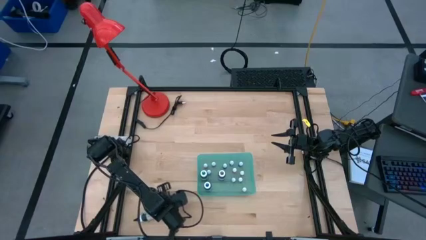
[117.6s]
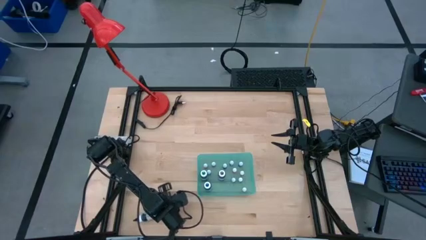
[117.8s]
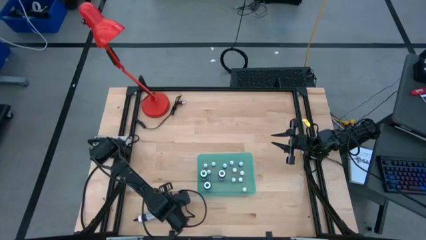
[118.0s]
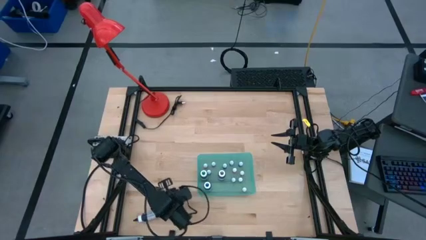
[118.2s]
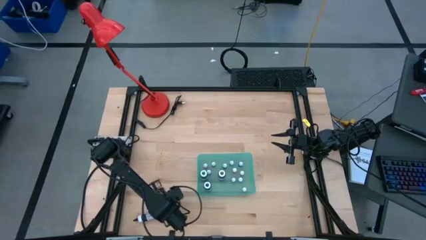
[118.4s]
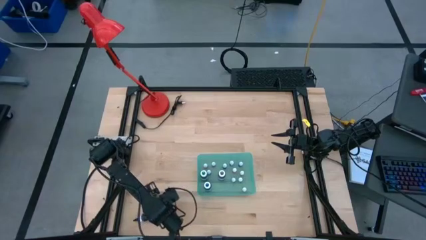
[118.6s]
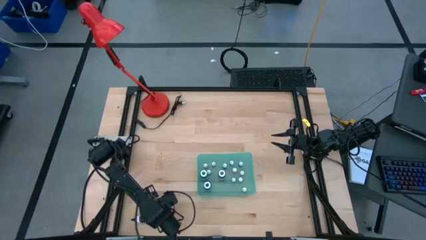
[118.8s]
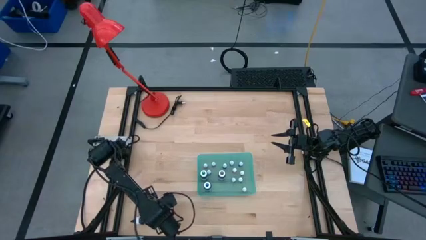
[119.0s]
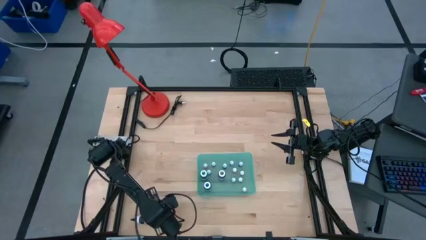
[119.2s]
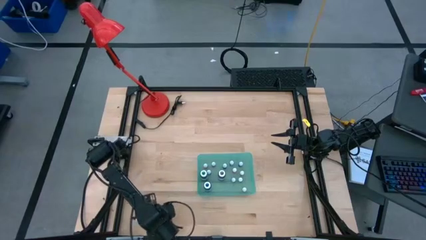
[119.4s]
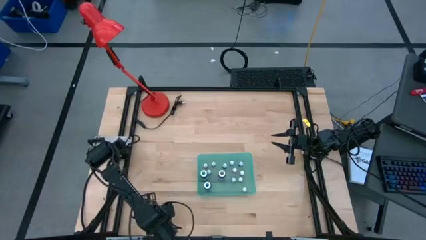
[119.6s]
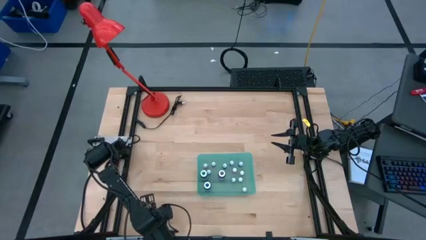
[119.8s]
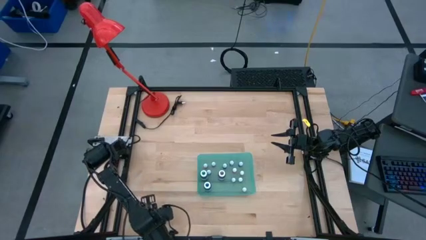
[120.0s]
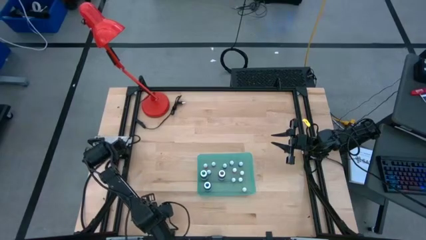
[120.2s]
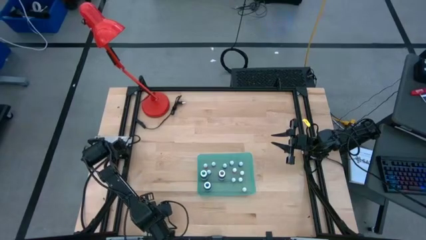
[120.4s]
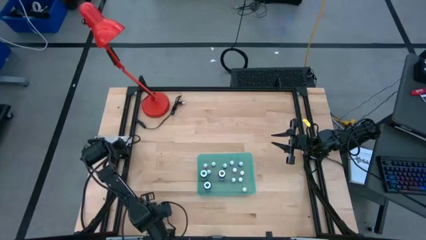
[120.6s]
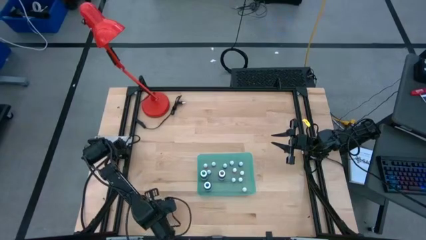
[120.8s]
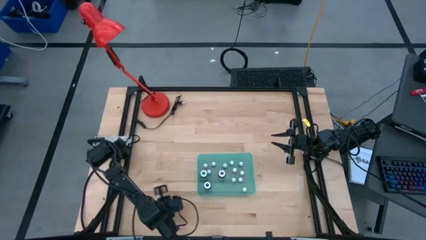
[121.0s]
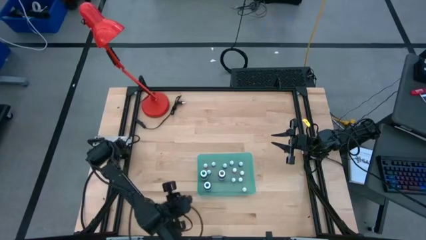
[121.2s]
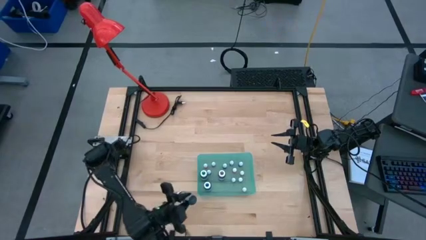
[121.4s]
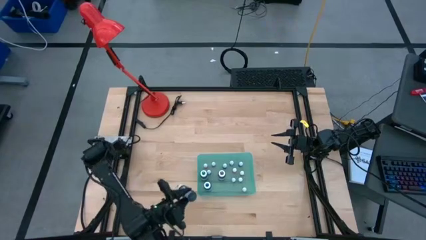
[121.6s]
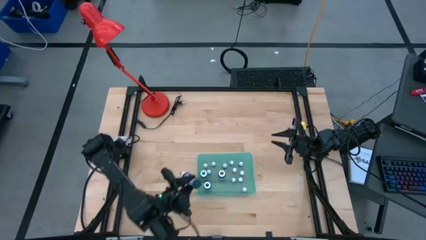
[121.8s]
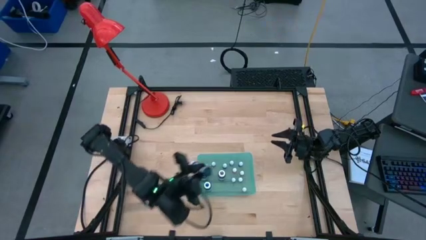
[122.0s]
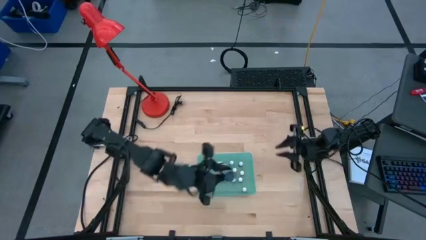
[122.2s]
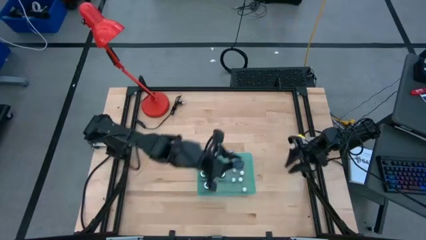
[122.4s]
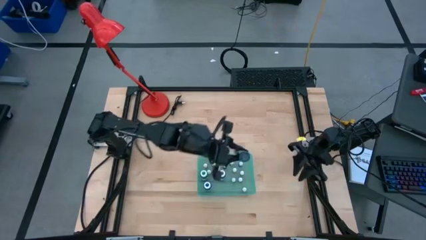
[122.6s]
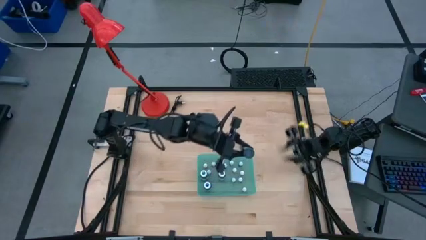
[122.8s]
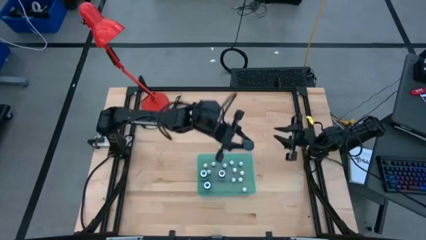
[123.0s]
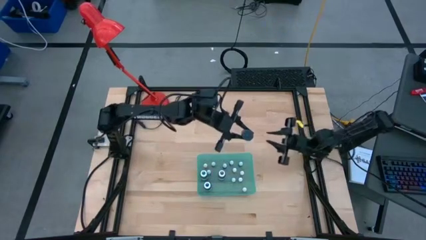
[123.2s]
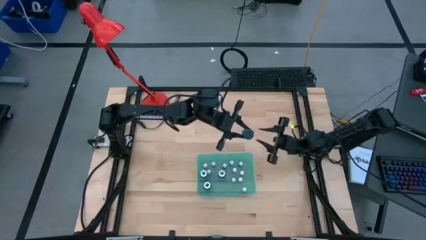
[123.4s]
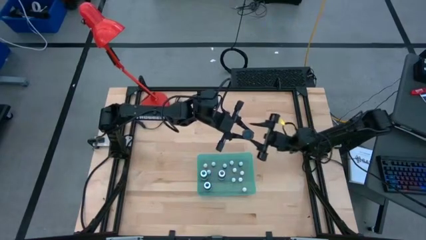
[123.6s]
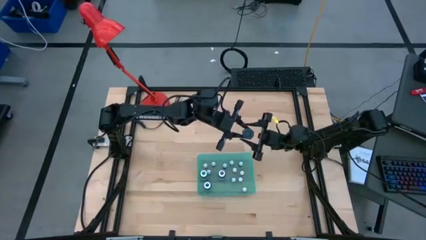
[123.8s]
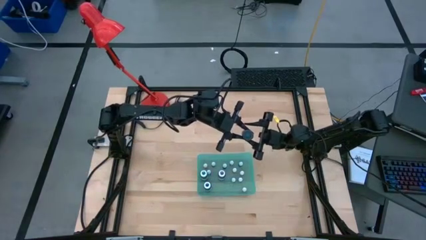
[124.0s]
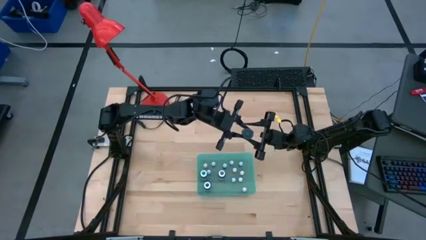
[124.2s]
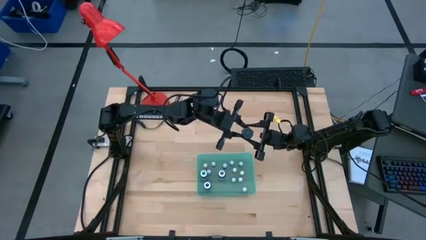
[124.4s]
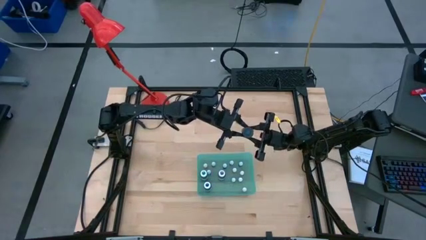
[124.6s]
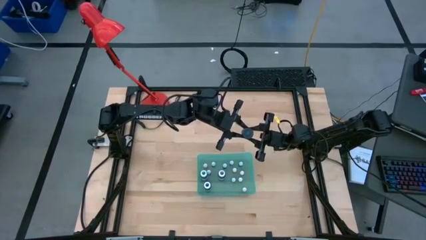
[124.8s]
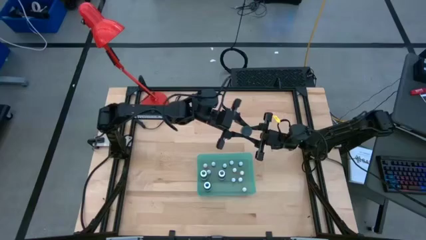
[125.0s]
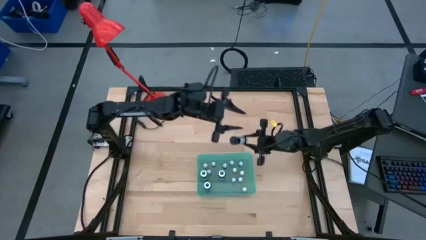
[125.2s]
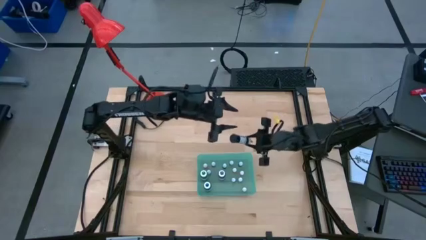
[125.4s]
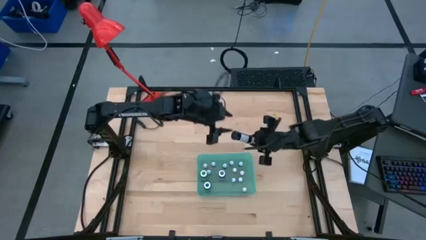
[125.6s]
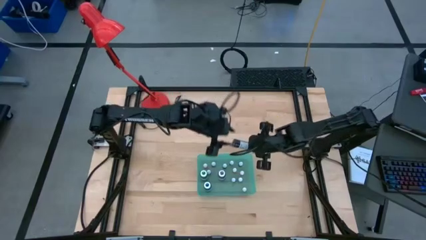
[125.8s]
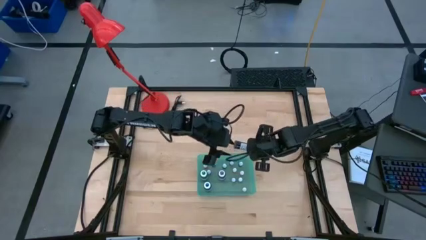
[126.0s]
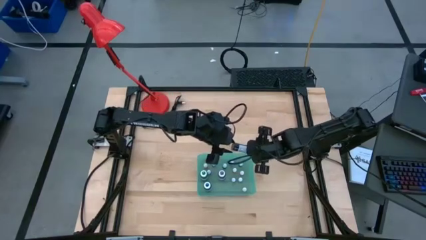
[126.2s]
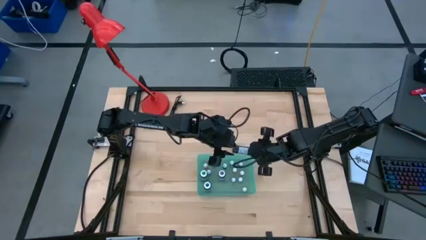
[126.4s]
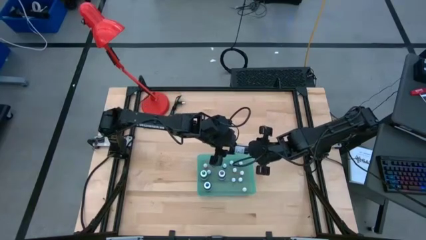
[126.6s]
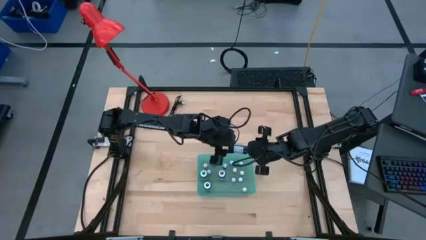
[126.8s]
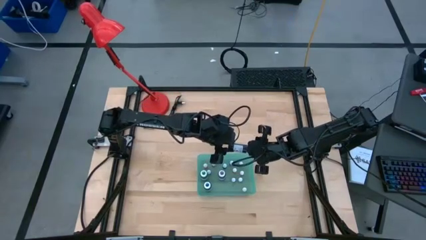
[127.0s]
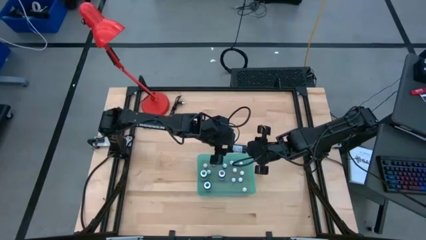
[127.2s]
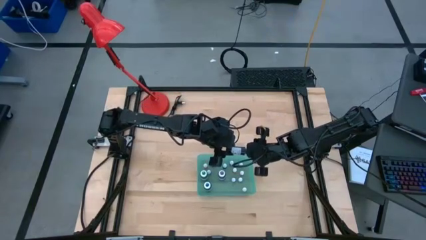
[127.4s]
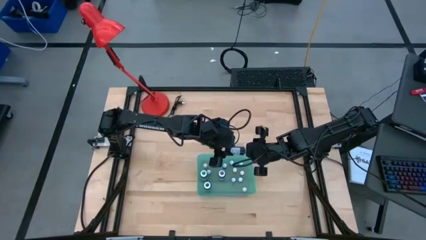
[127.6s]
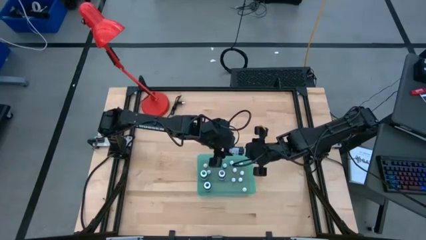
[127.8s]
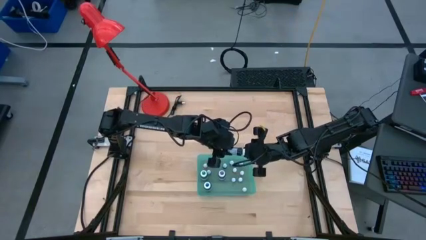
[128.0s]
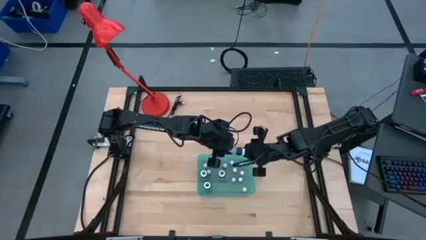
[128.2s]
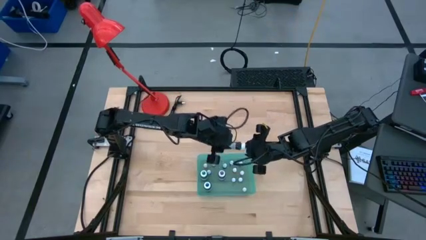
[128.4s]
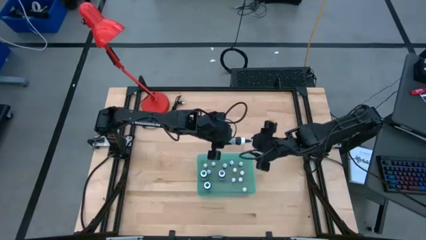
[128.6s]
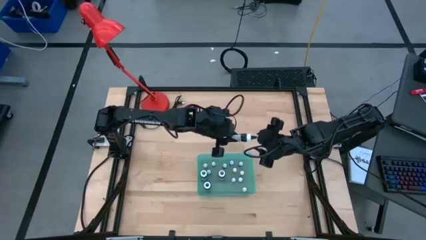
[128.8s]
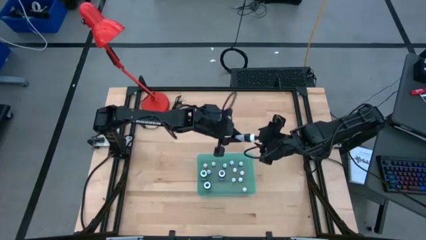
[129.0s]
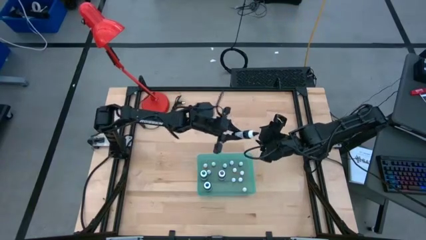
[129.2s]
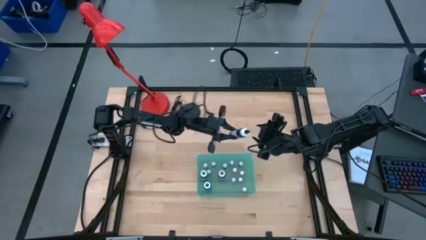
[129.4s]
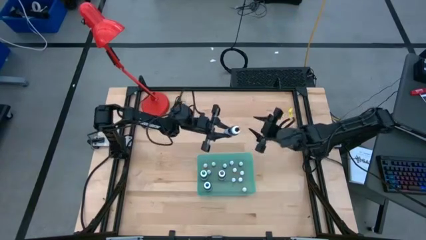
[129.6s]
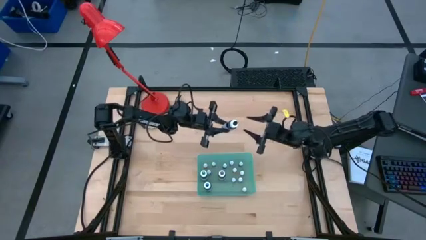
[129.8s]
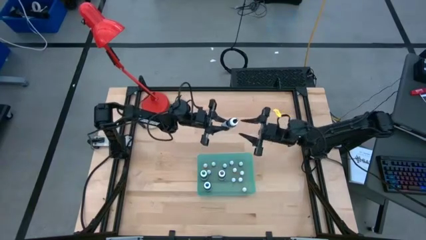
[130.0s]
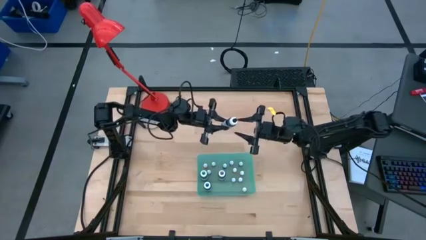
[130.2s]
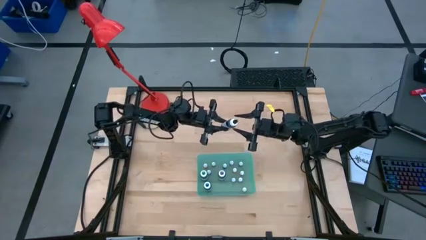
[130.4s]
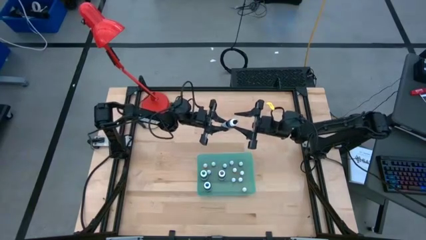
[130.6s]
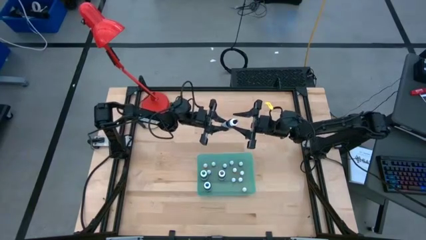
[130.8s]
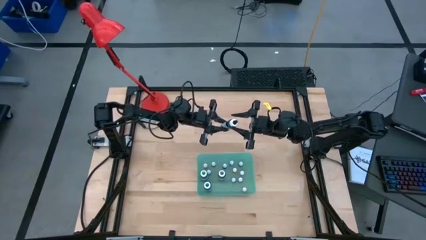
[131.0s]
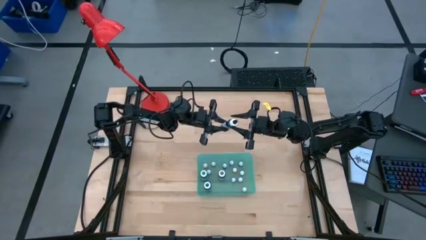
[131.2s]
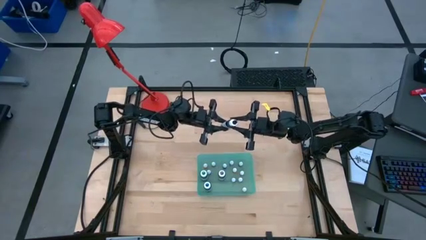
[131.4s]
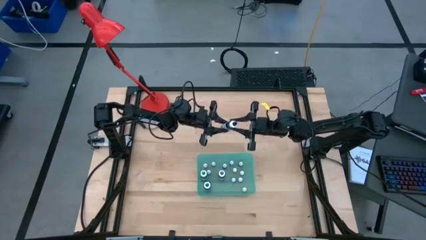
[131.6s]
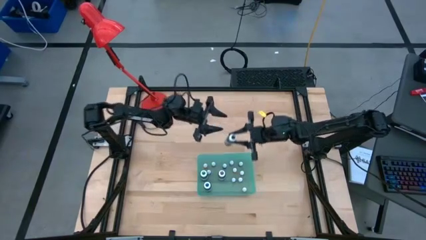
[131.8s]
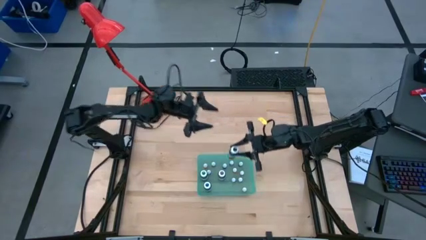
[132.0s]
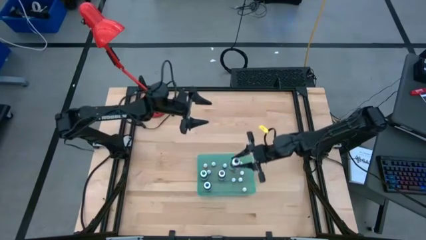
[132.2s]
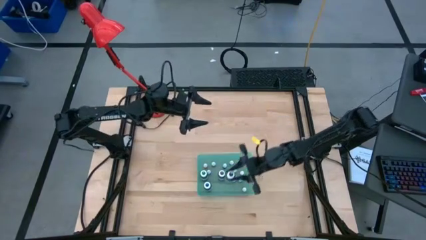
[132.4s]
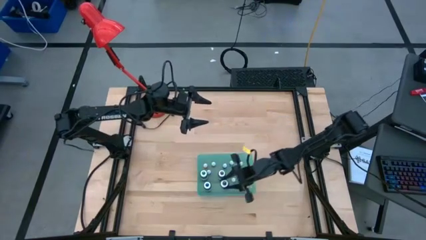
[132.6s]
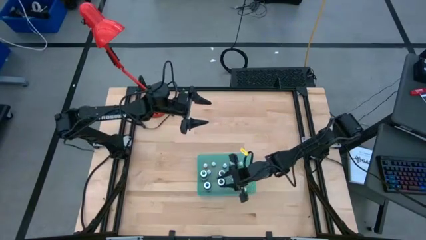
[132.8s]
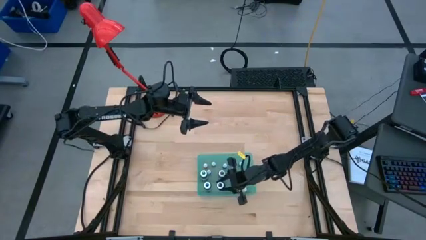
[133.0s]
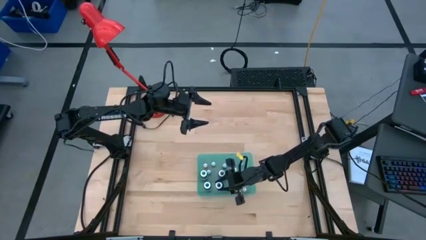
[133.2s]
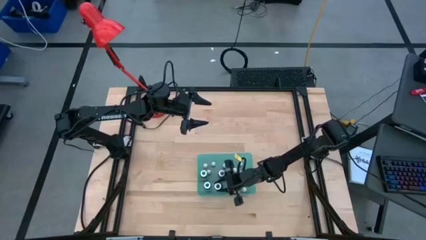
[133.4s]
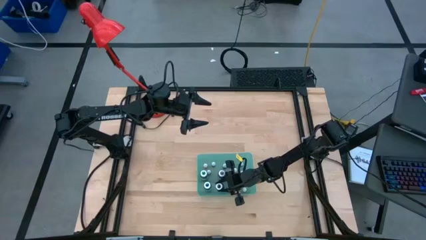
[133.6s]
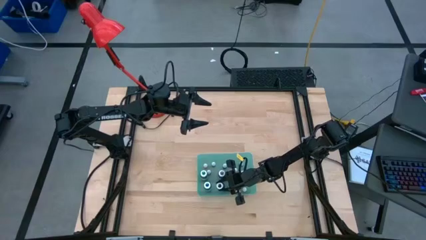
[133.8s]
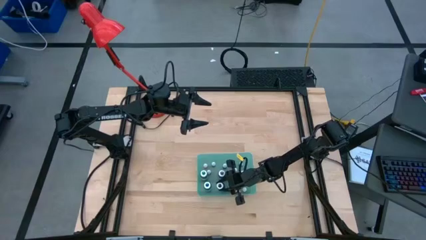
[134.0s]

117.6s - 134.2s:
Task: Pick & Place food coloring
Put the large black food coloring bottle into the green bin
